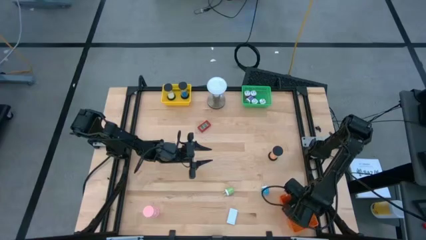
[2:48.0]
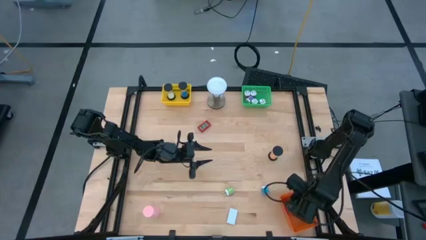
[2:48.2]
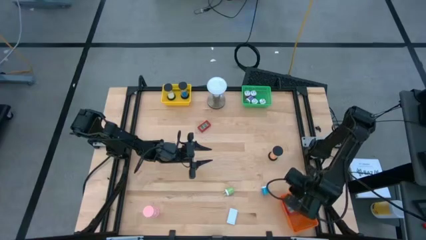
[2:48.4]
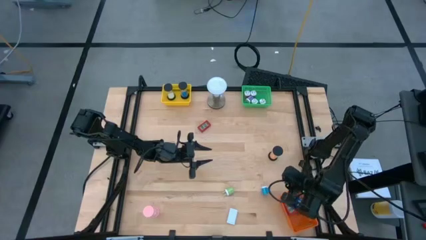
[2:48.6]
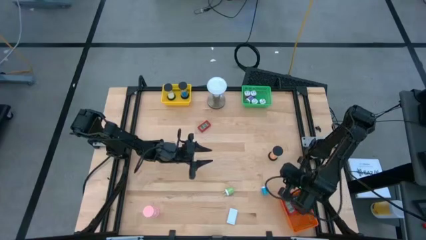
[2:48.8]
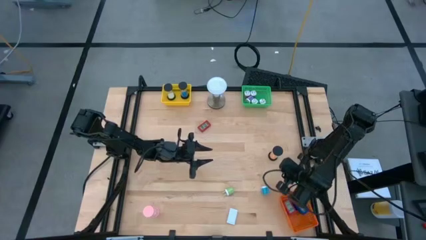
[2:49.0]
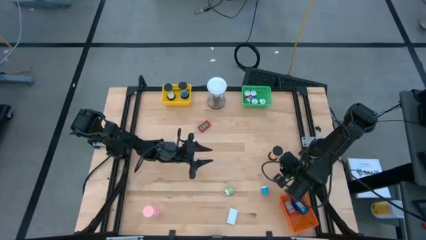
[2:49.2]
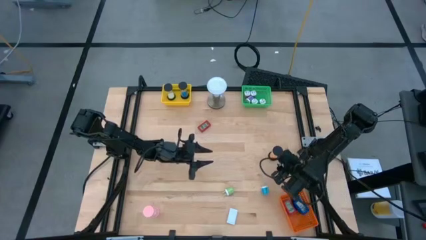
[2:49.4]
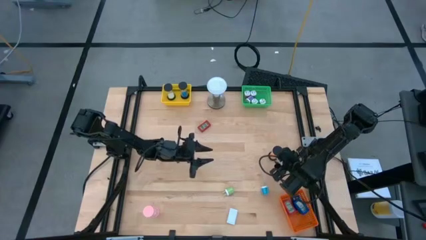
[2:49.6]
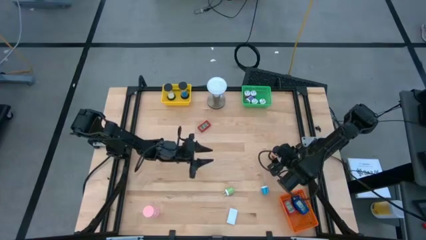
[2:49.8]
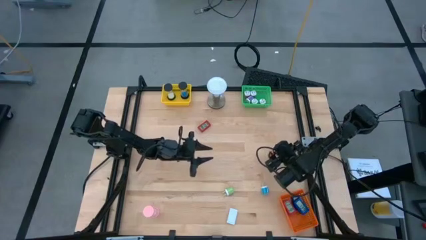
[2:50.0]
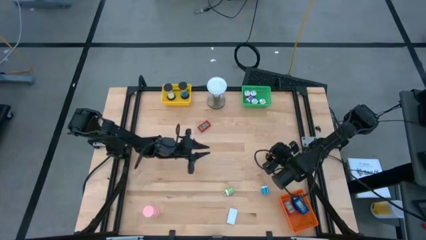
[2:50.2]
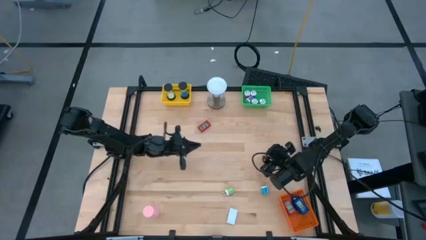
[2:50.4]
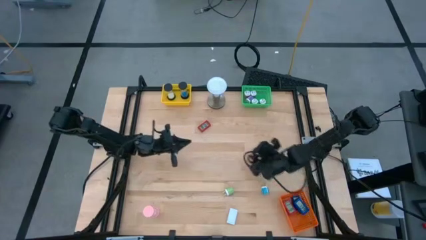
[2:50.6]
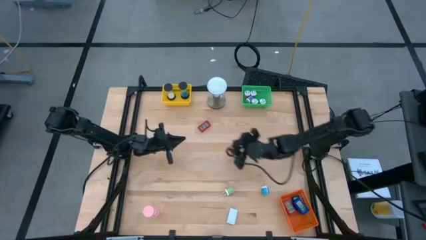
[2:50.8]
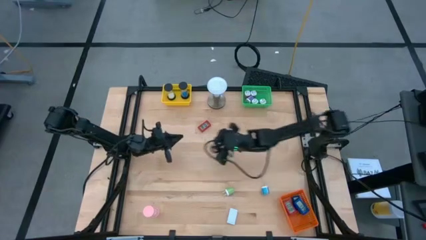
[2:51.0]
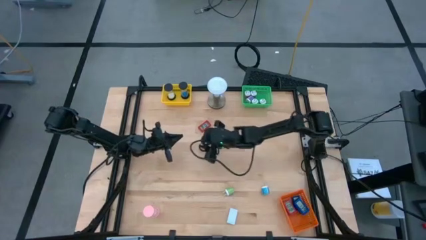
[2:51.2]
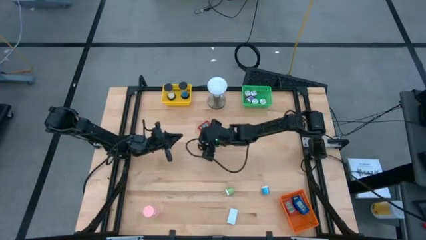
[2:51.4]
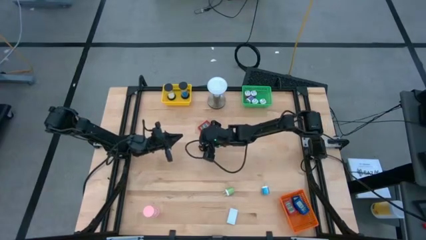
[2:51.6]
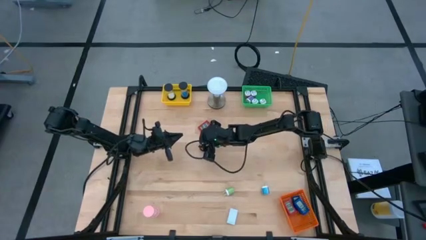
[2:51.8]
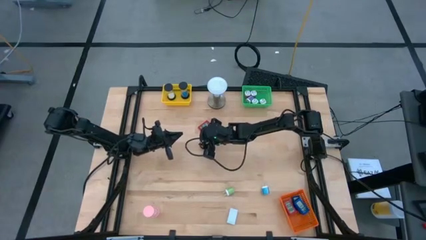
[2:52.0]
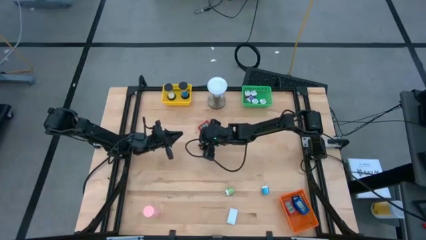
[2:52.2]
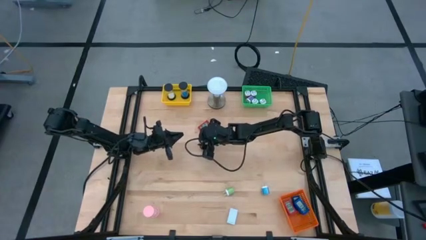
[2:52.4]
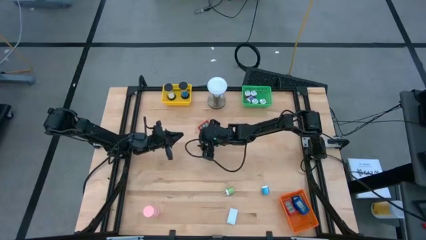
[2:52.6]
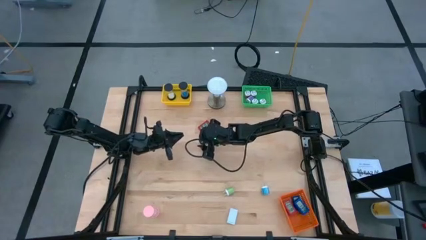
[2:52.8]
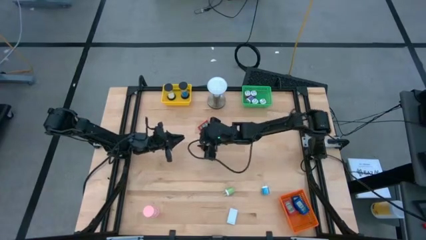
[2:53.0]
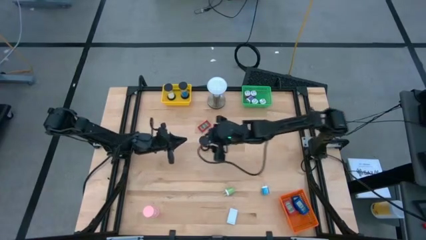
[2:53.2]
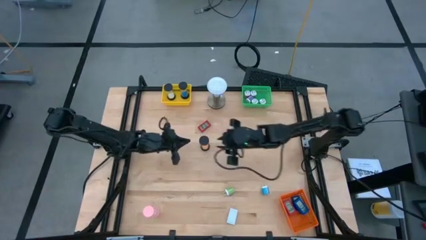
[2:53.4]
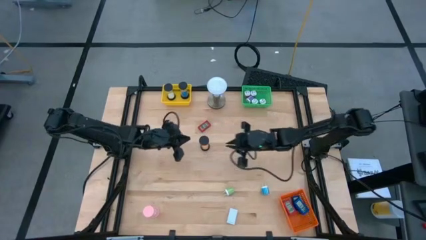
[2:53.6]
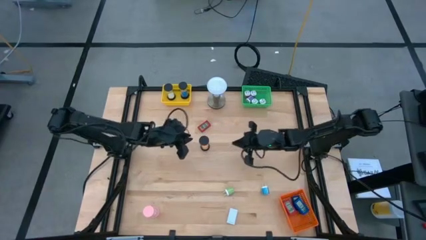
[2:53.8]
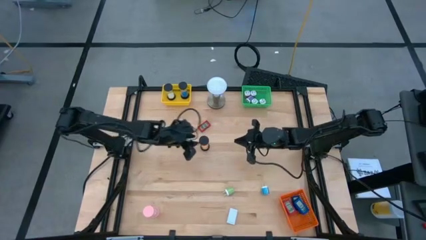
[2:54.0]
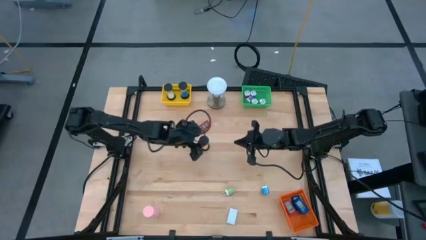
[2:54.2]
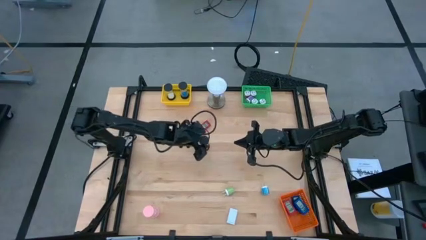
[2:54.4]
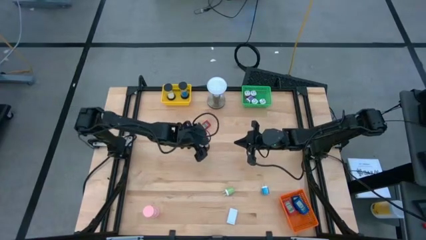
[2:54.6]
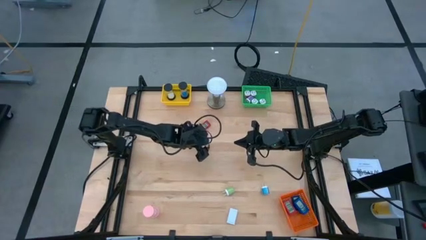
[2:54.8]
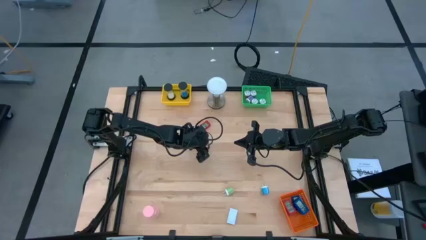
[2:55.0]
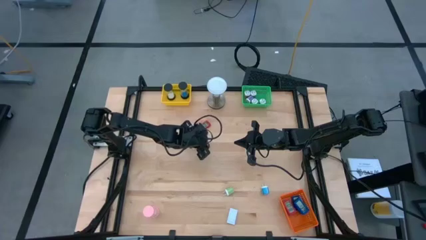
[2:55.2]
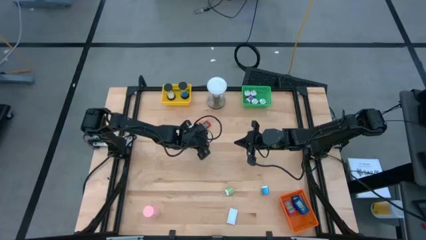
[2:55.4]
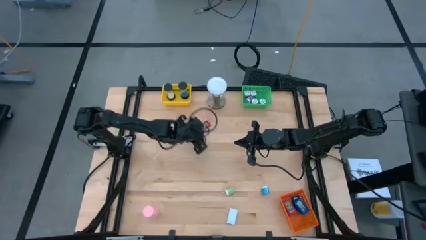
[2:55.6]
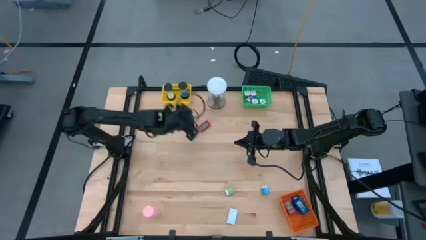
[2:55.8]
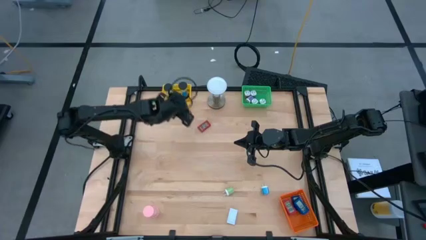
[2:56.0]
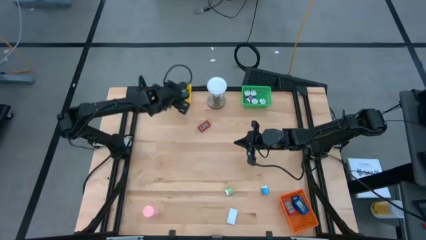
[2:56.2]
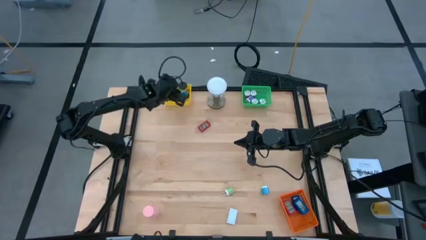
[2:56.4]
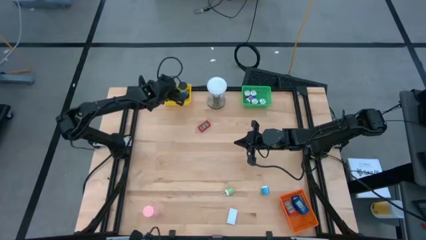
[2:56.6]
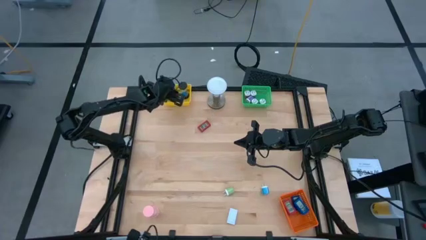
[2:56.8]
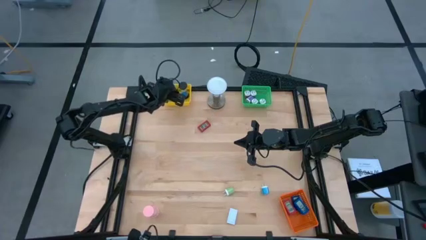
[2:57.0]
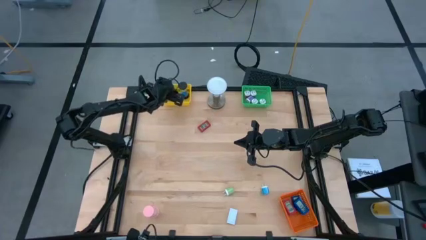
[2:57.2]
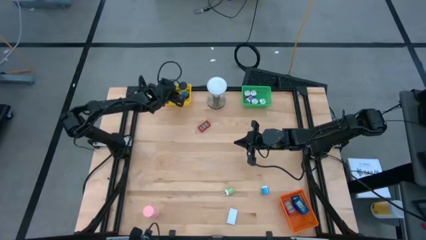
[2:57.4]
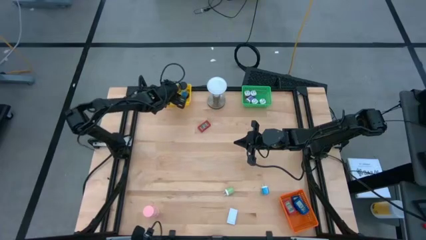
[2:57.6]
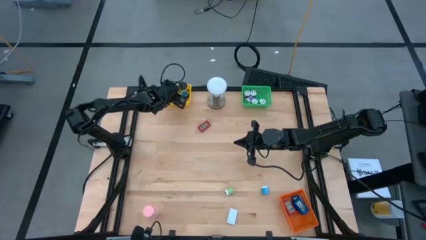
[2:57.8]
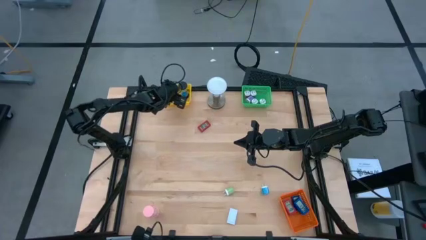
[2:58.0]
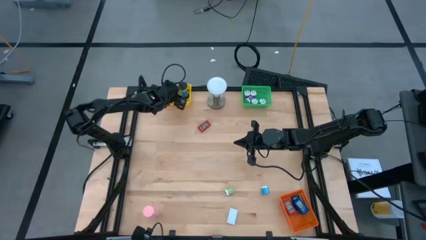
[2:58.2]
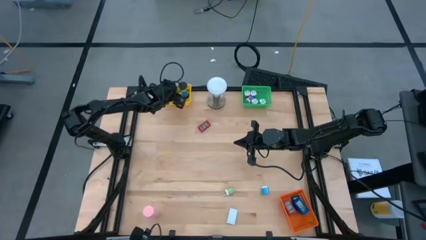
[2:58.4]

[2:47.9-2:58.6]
Task: Pick & Place Office items
Put the orange hourglass into the yellow bin
